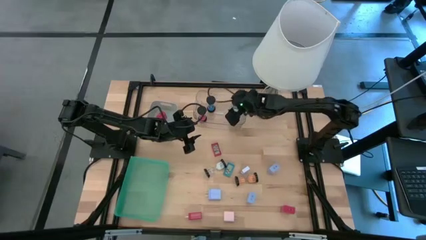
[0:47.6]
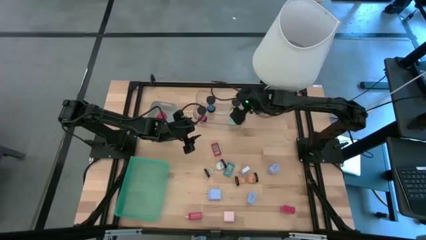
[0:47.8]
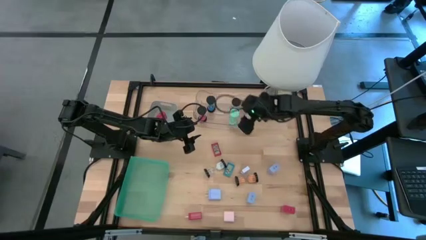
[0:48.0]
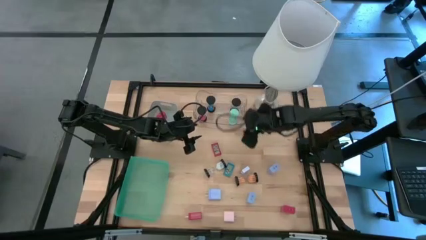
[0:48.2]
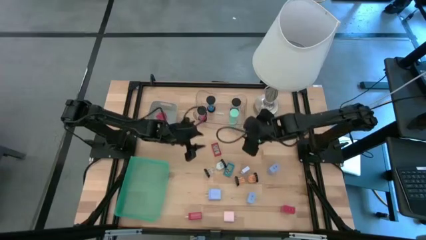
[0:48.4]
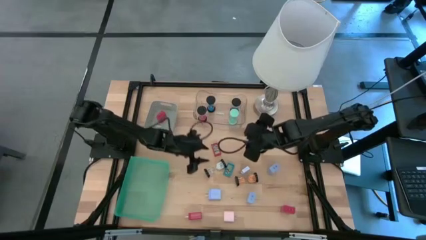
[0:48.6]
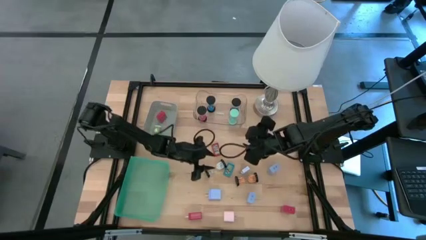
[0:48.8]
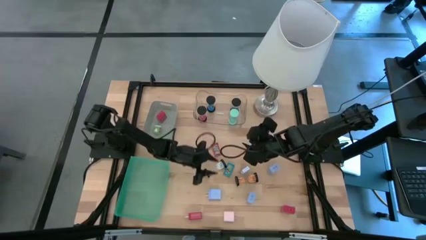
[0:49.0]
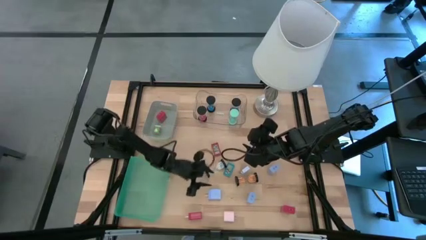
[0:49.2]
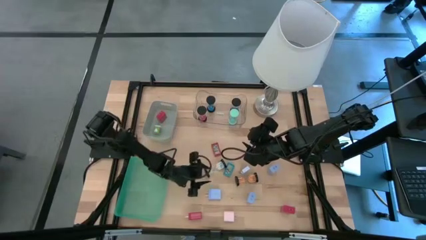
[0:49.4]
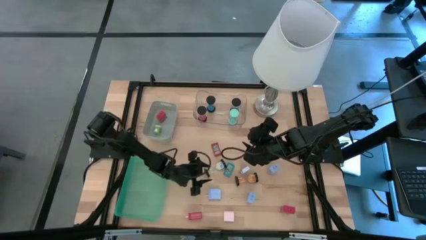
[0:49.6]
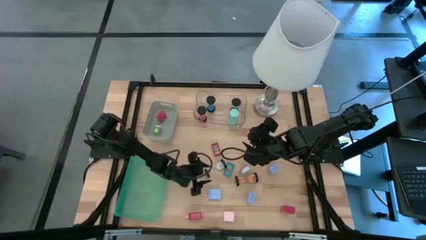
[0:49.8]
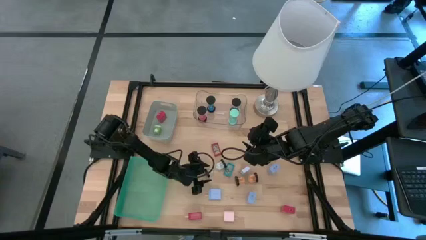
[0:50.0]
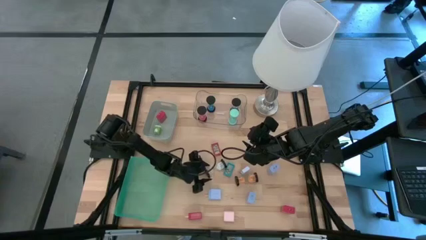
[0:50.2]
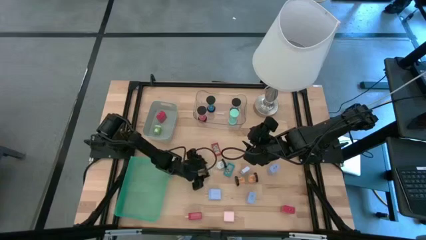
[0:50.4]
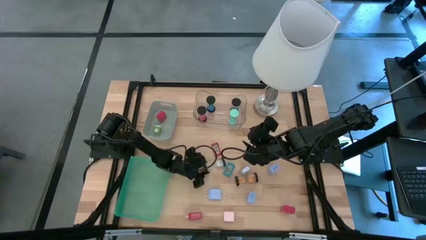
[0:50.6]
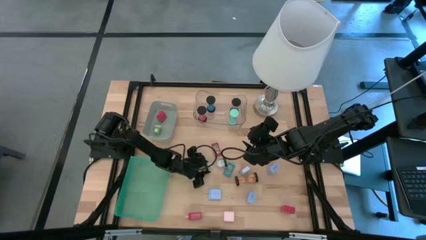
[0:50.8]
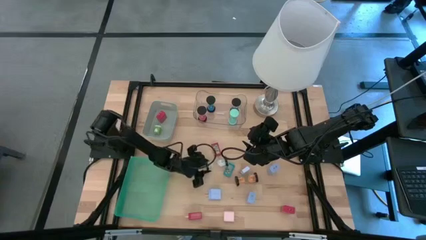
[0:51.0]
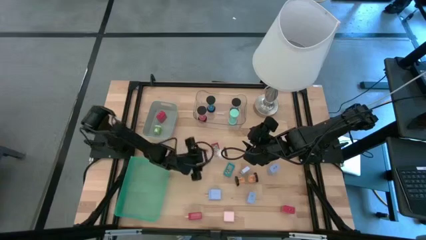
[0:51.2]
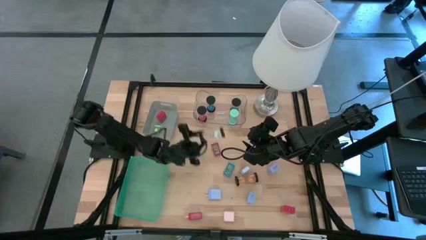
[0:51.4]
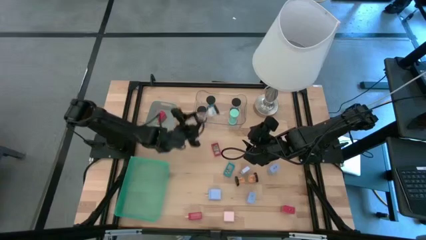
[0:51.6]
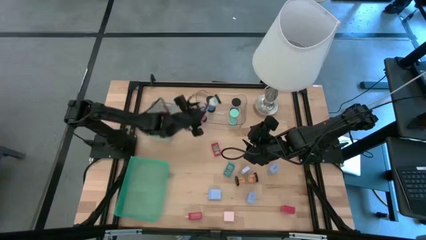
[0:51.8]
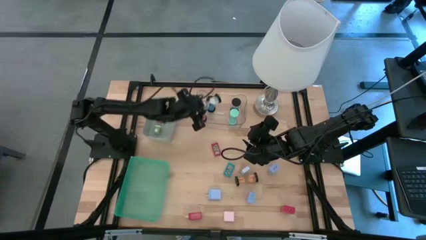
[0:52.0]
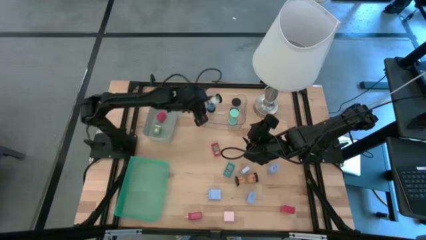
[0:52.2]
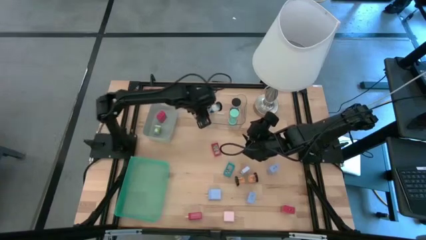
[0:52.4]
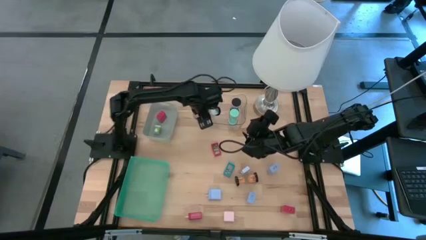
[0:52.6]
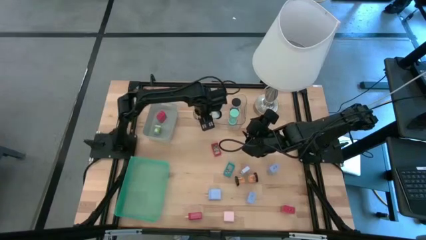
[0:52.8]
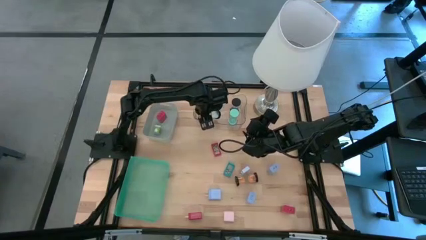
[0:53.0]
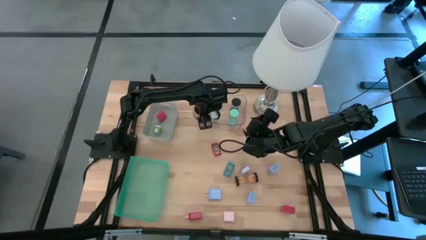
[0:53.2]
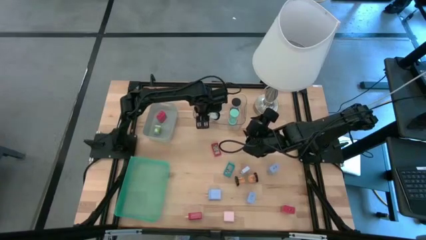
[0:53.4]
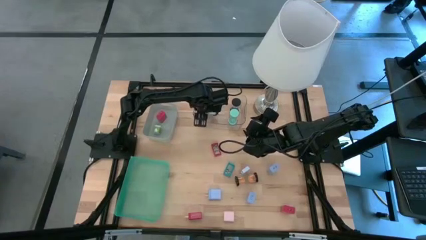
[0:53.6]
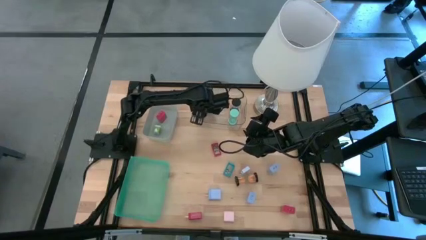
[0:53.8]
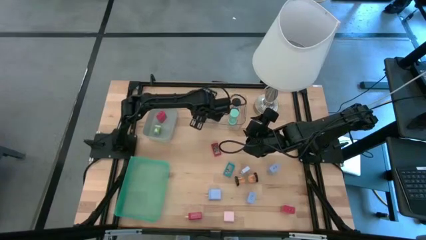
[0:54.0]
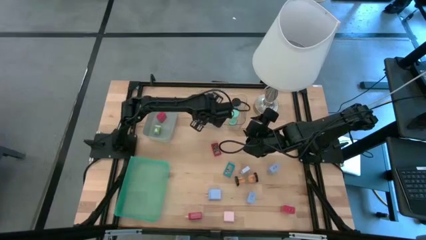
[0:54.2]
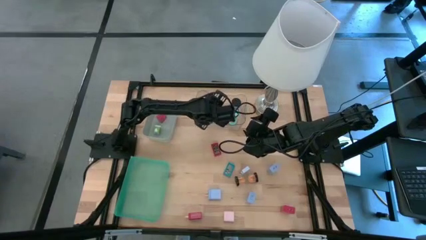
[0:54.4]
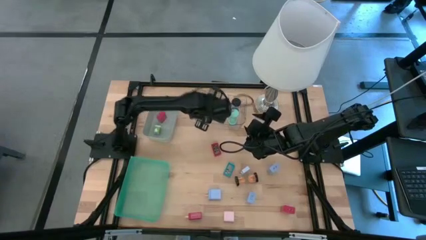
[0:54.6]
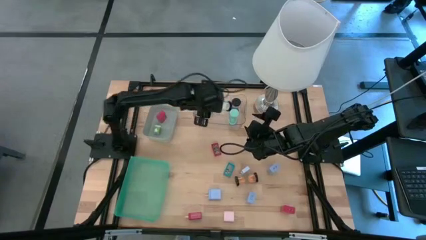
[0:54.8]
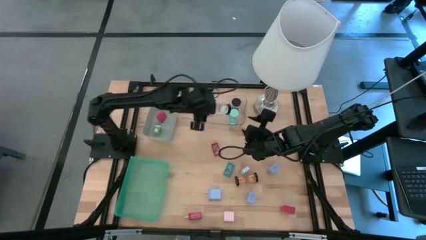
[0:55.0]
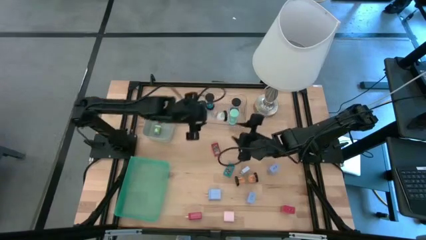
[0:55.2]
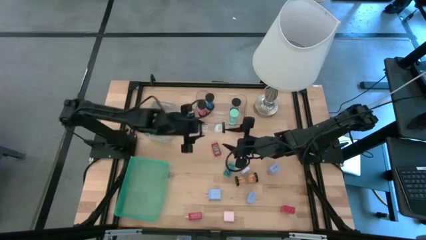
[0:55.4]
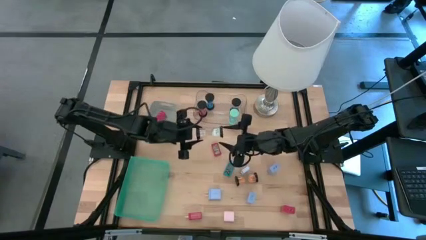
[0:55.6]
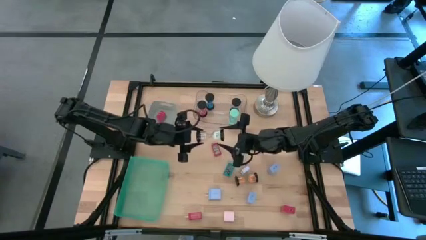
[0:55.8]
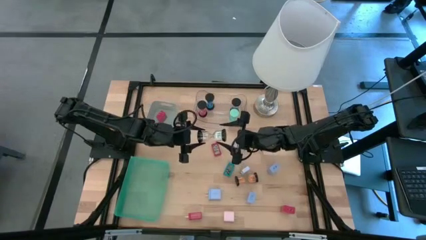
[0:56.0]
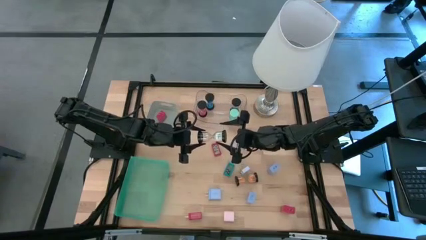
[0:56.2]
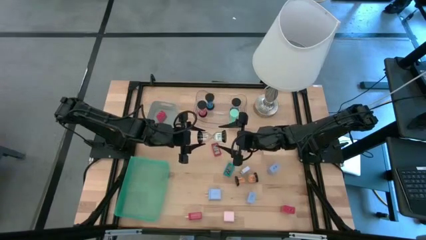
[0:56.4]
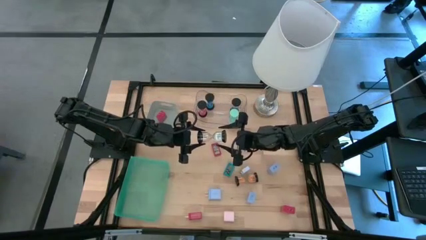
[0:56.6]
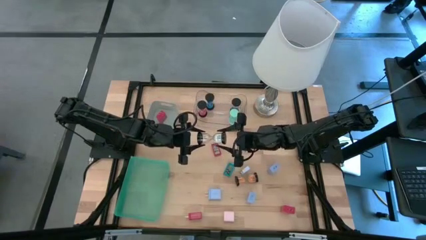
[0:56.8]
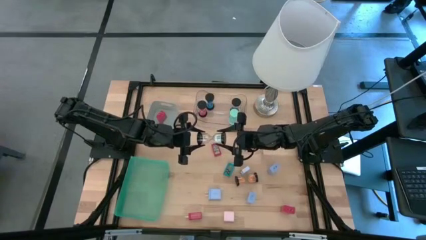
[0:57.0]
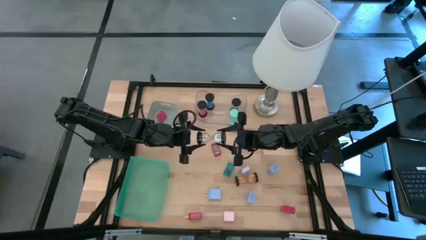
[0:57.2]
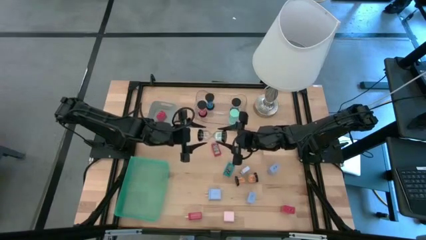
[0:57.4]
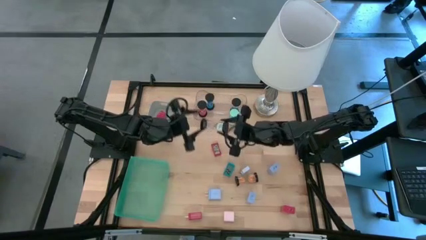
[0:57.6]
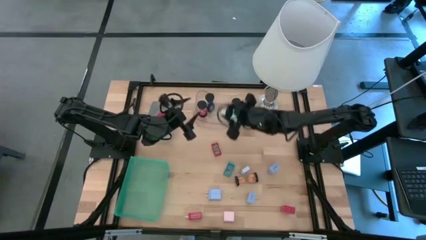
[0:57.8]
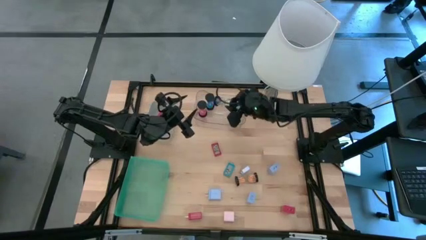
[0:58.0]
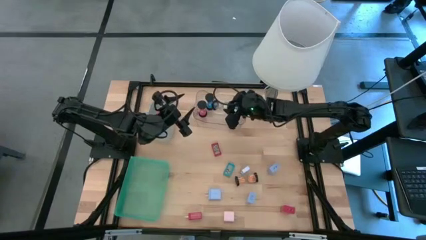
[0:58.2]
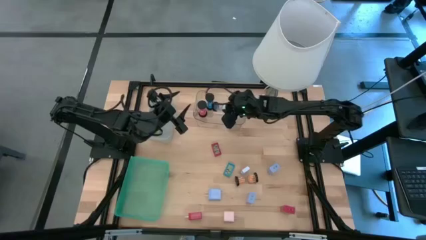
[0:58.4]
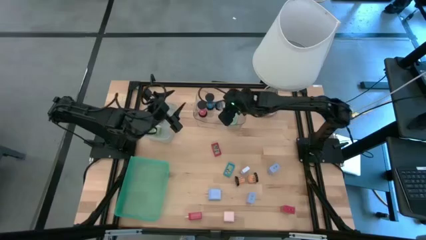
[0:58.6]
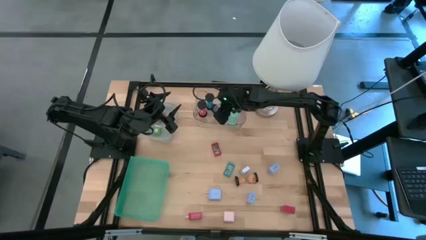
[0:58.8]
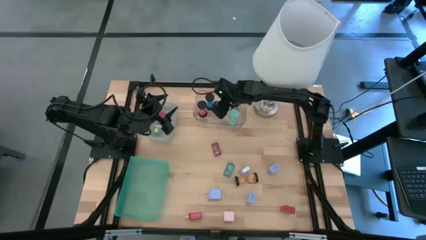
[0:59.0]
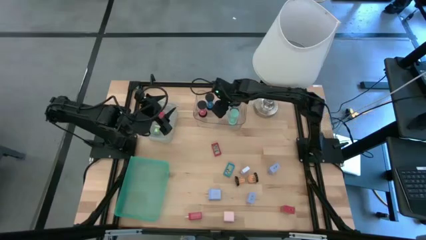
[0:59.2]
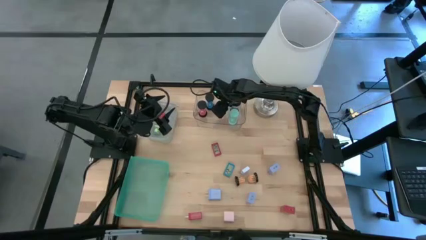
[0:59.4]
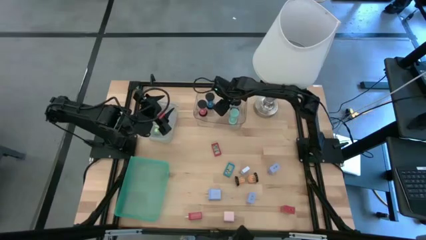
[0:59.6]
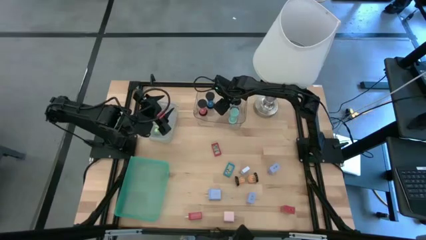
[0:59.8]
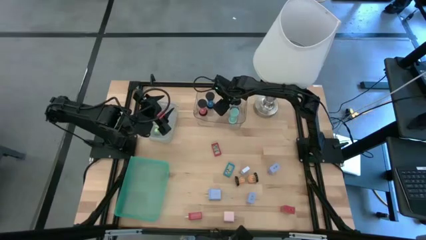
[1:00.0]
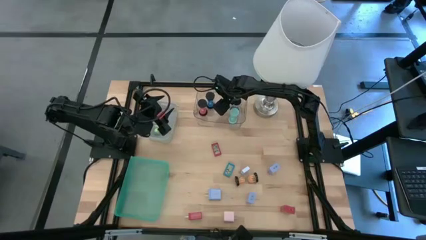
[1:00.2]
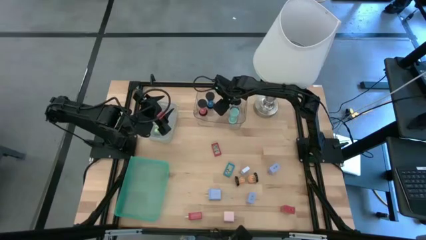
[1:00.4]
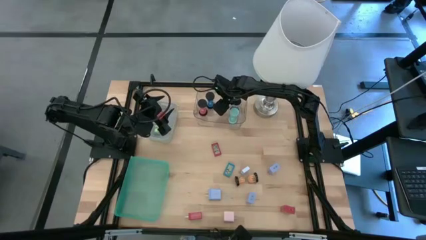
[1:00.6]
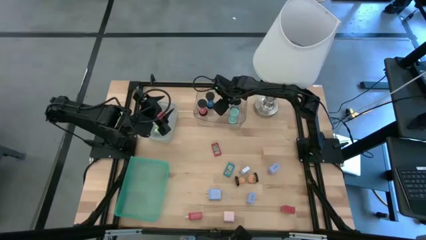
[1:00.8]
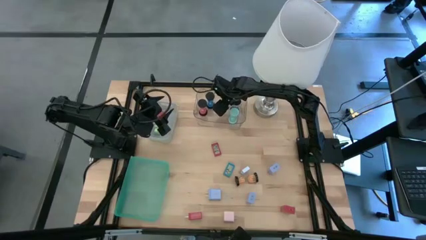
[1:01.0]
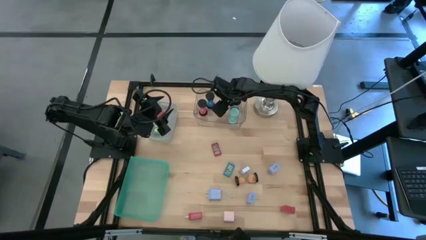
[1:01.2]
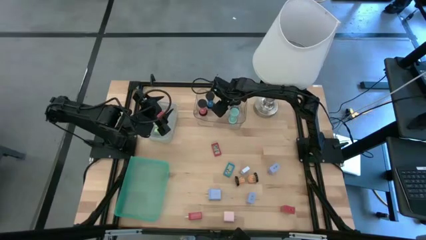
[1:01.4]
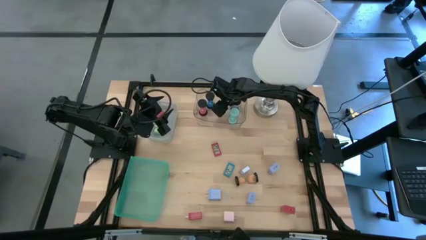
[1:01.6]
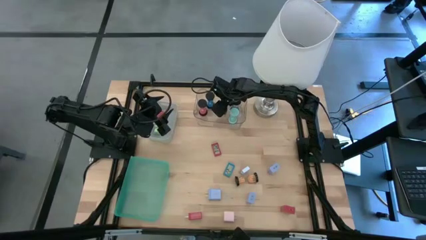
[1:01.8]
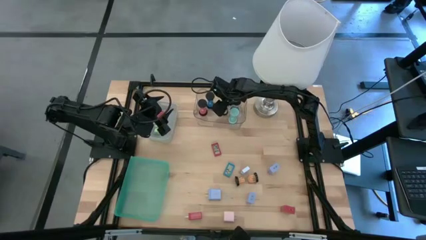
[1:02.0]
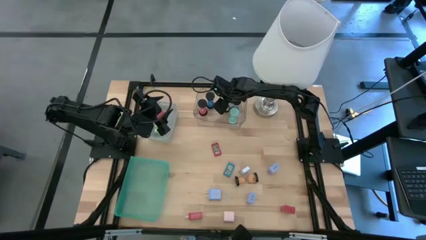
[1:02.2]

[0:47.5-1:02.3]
Task: Pick & Place Office items
Put the white hourglass into the transparent bin

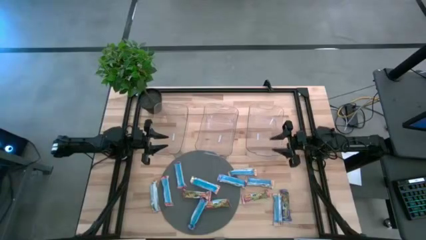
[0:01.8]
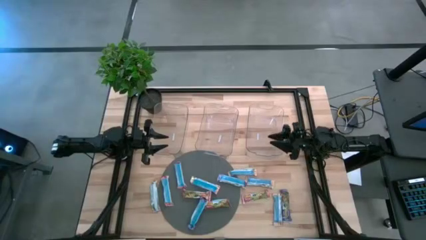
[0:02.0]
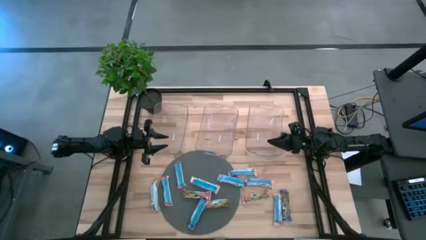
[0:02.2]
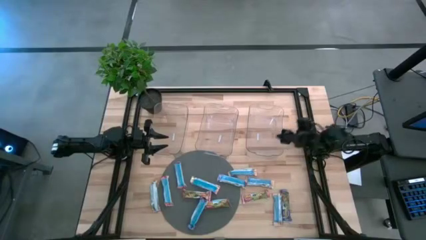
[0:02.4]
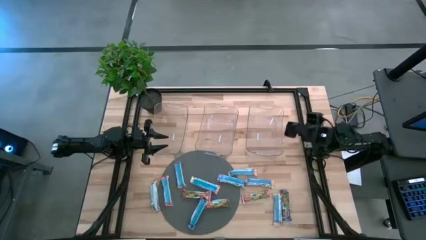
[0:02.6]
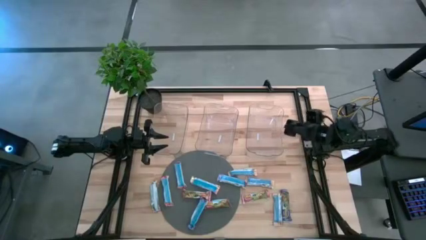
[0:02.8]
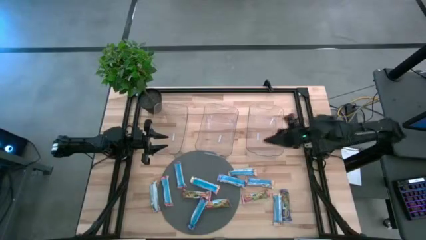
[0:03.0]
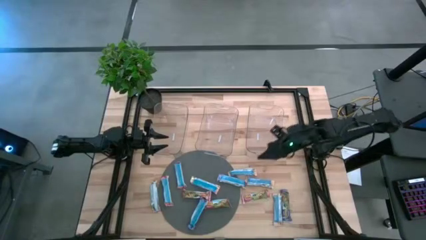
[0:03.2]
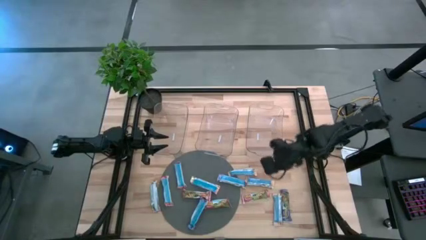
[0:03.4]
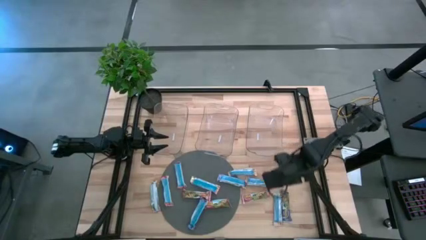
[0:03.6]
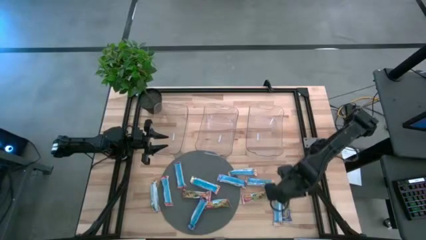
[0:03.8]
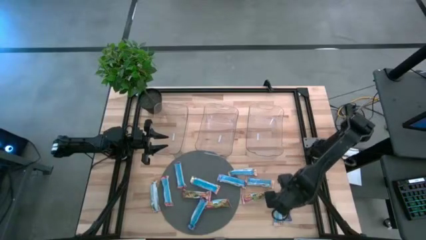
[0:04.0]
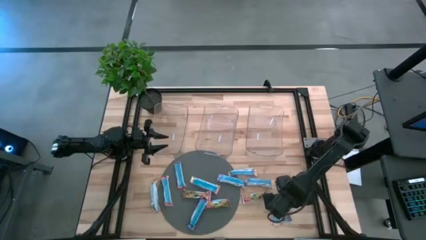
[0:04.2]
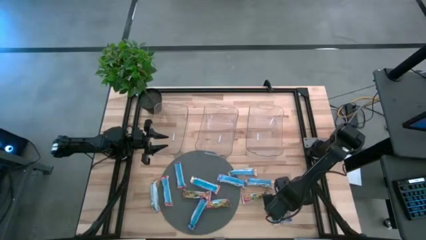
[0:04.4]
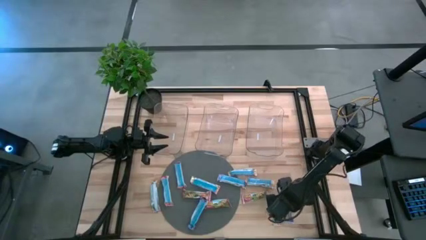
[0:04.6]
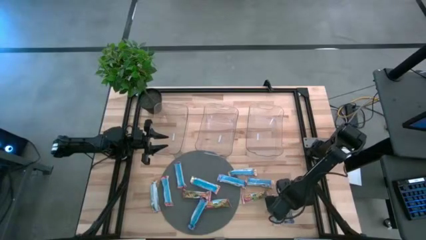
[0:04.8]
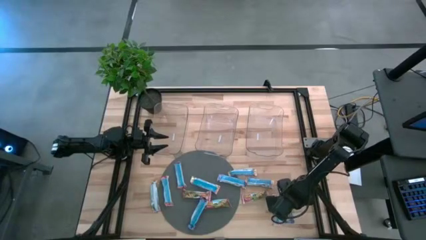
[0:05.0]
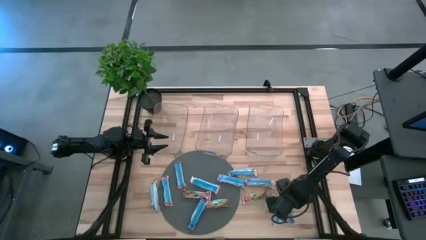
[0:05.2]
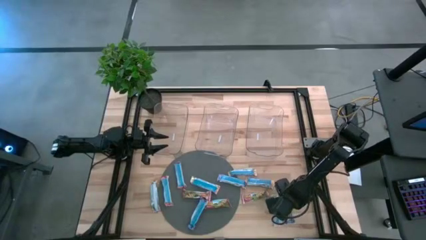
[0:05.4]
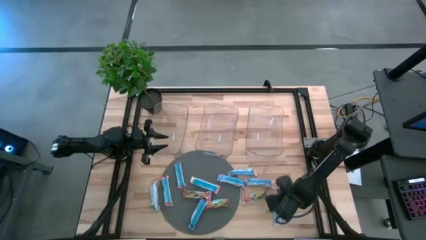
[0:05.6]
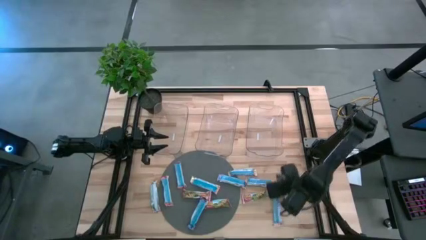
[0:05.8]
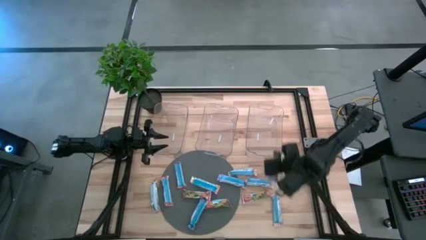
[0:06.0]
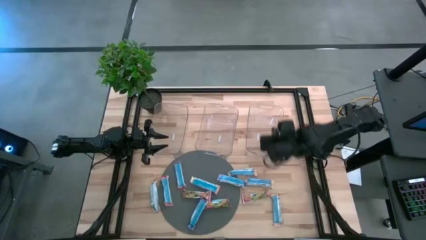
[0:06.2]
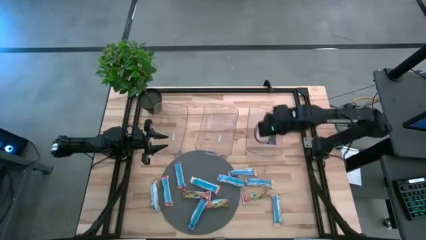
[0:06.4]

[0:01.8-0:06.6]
Task: Pick and place Granola Bars by type
Put the blue granola bar into the right transparent bin
